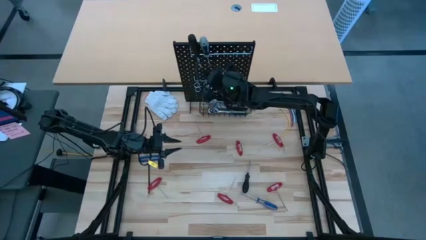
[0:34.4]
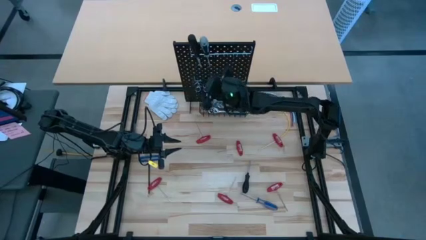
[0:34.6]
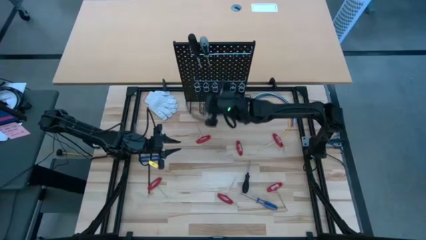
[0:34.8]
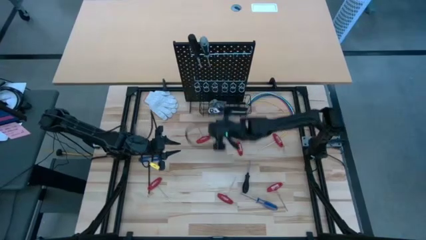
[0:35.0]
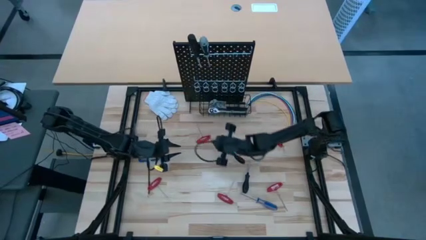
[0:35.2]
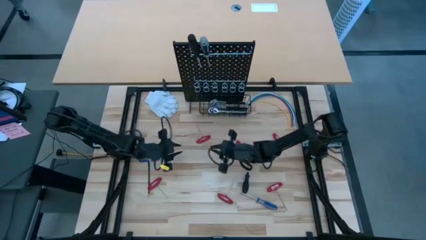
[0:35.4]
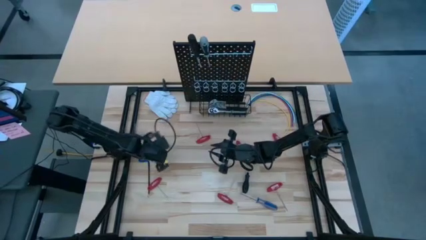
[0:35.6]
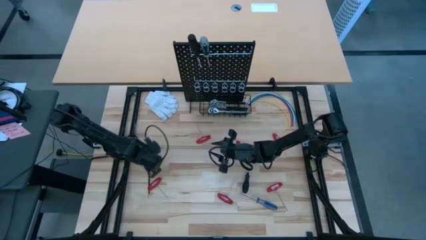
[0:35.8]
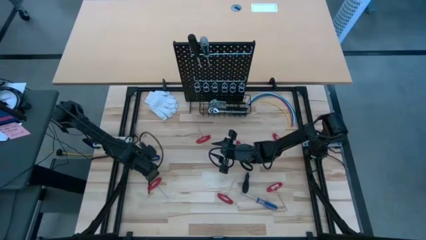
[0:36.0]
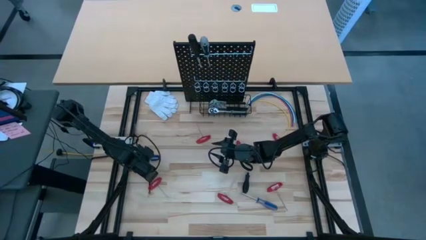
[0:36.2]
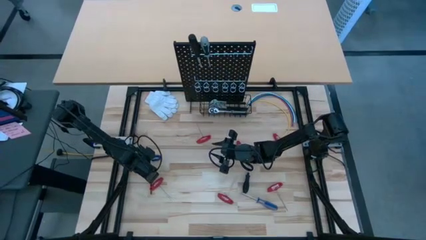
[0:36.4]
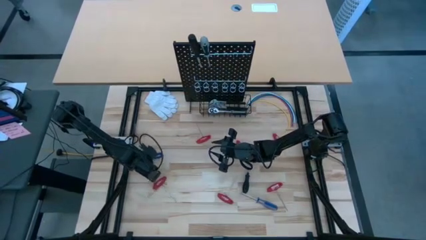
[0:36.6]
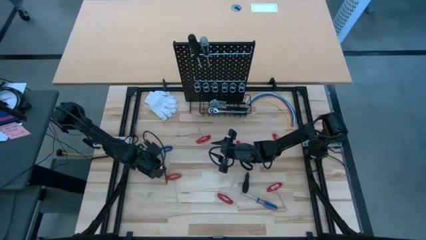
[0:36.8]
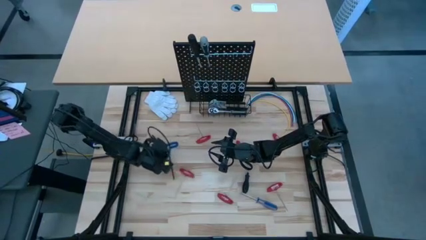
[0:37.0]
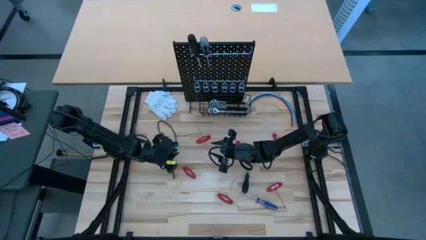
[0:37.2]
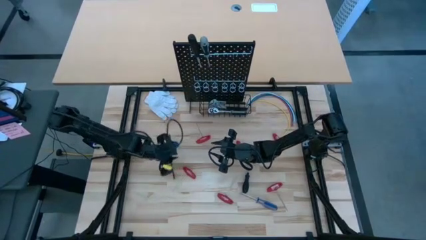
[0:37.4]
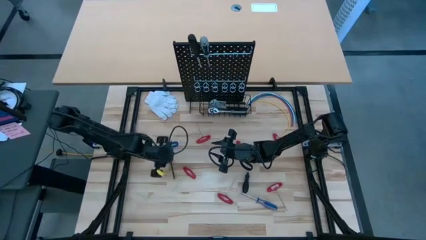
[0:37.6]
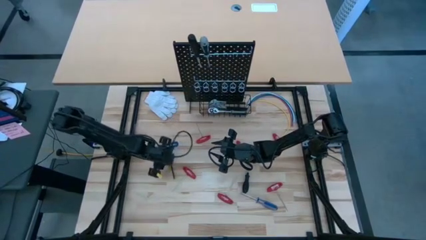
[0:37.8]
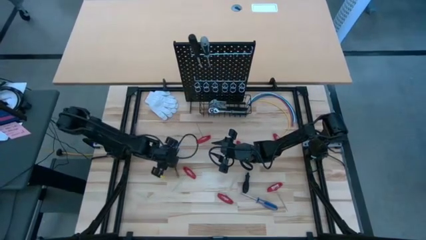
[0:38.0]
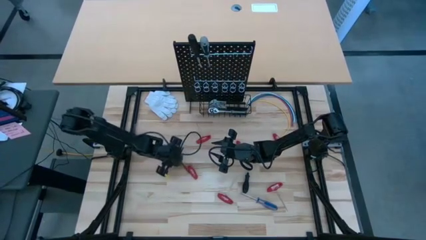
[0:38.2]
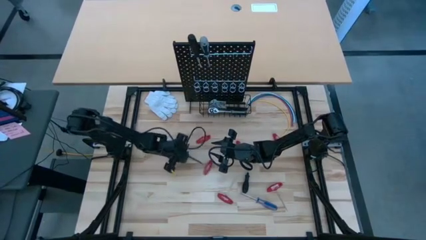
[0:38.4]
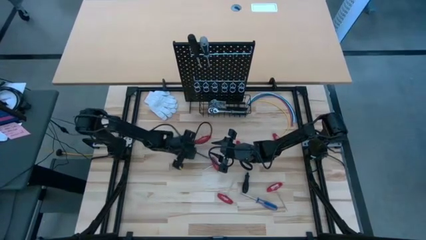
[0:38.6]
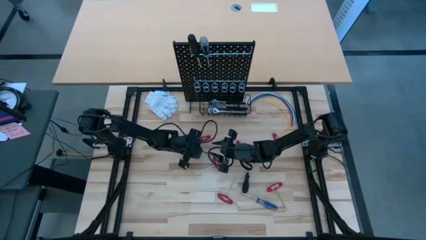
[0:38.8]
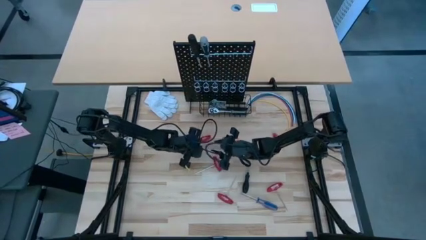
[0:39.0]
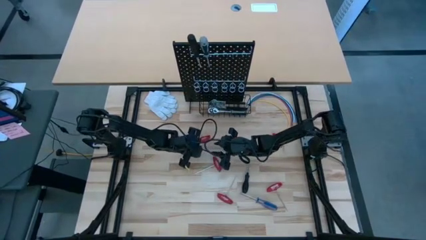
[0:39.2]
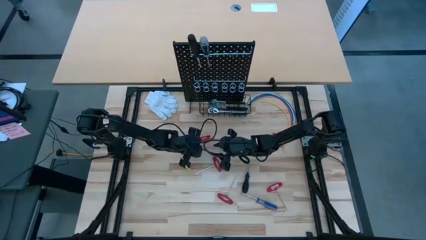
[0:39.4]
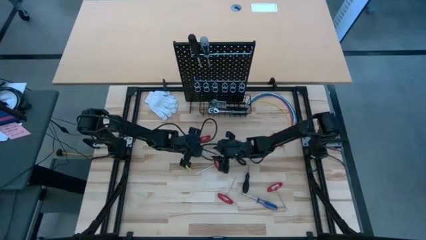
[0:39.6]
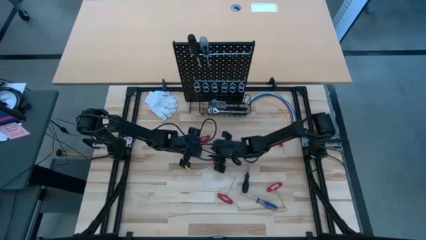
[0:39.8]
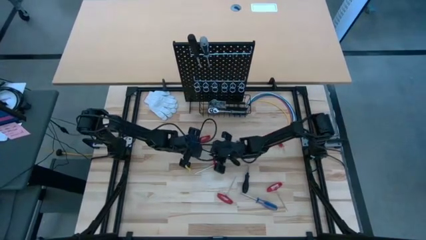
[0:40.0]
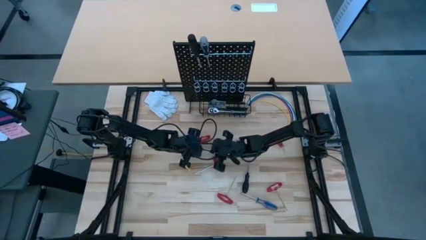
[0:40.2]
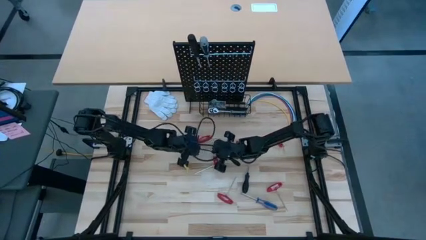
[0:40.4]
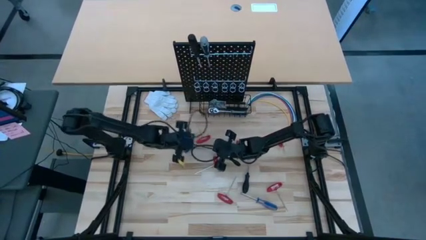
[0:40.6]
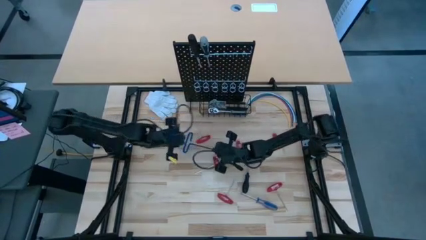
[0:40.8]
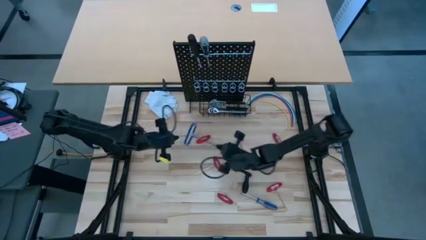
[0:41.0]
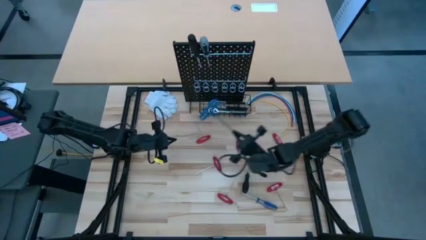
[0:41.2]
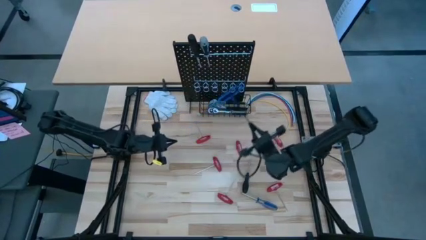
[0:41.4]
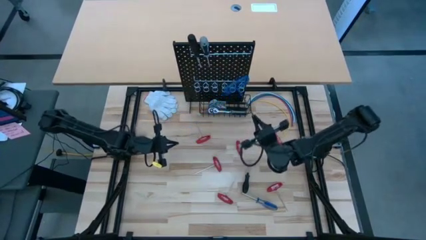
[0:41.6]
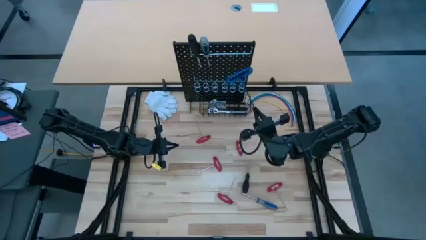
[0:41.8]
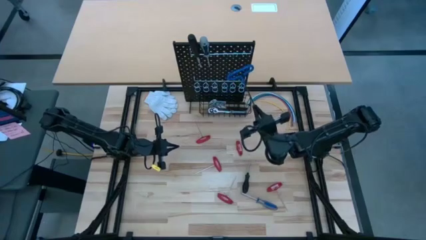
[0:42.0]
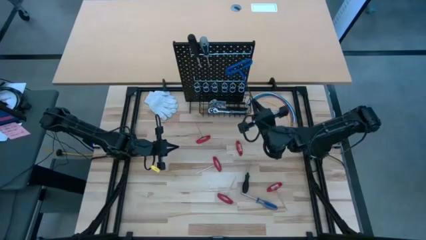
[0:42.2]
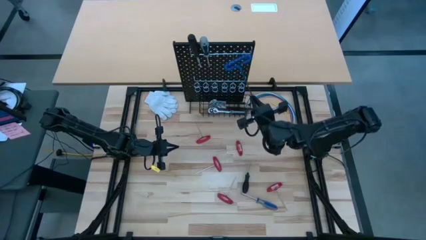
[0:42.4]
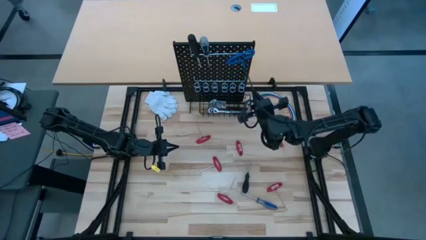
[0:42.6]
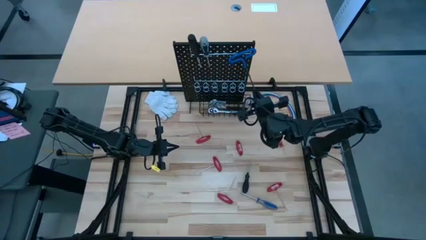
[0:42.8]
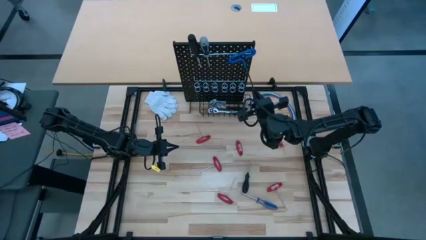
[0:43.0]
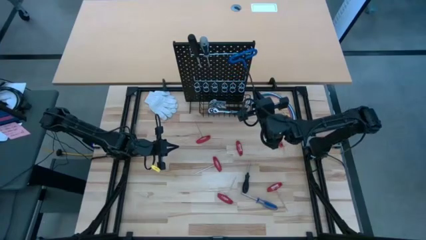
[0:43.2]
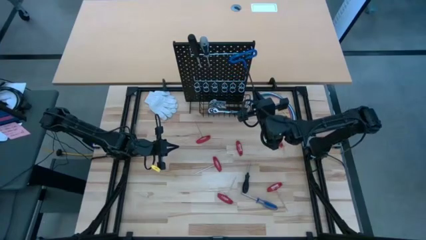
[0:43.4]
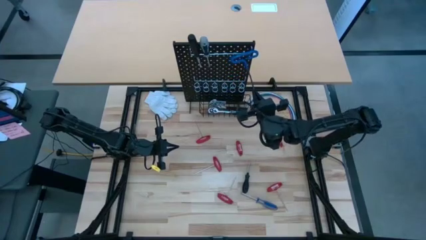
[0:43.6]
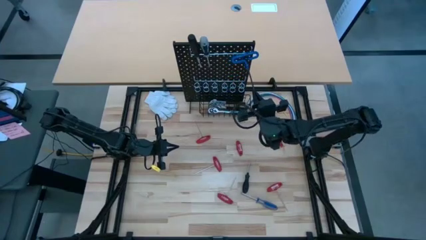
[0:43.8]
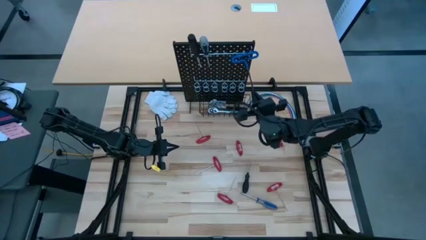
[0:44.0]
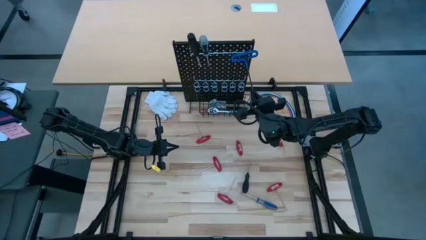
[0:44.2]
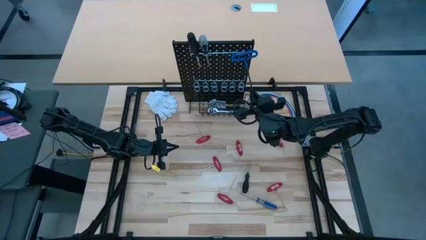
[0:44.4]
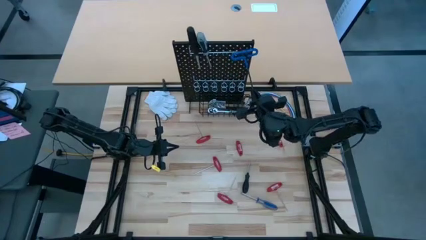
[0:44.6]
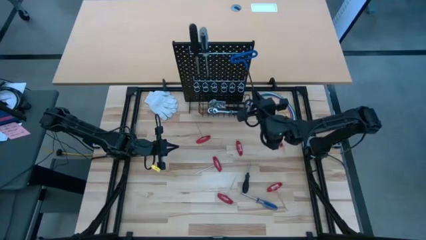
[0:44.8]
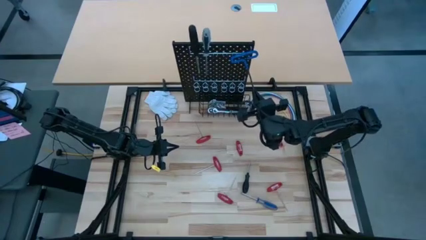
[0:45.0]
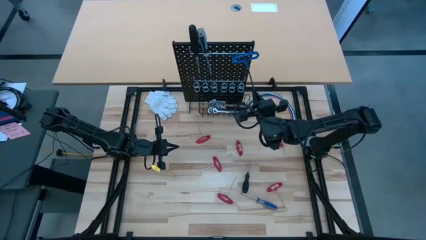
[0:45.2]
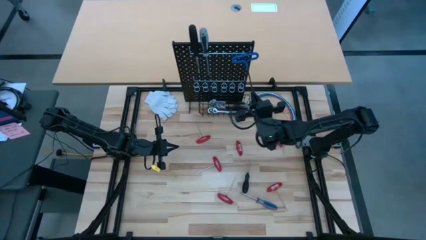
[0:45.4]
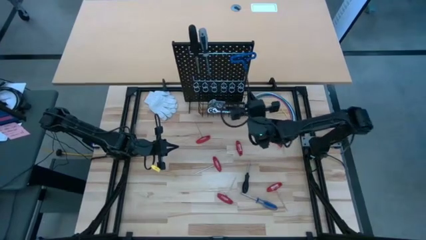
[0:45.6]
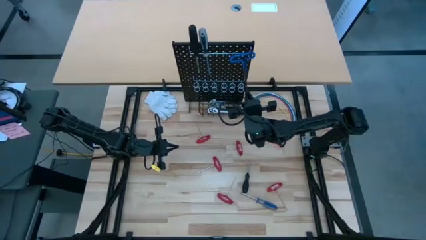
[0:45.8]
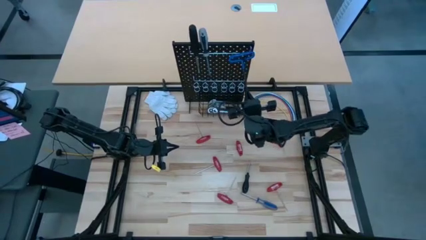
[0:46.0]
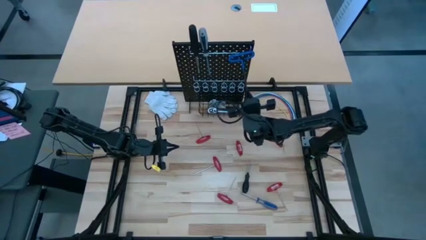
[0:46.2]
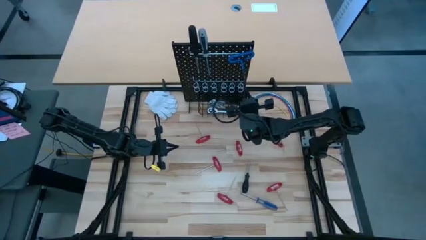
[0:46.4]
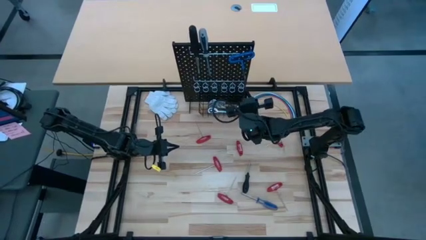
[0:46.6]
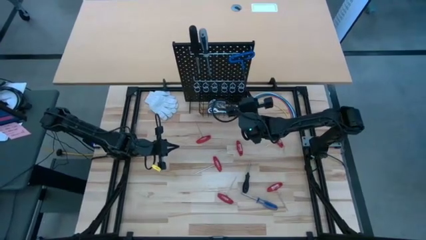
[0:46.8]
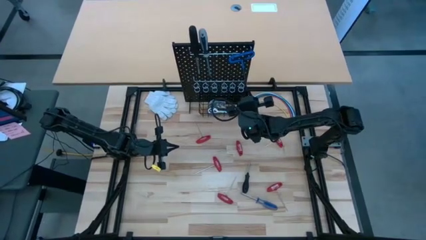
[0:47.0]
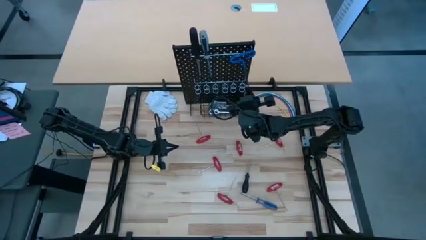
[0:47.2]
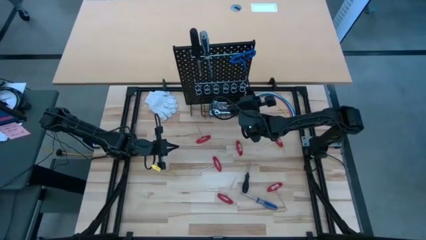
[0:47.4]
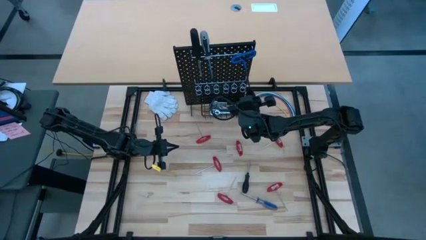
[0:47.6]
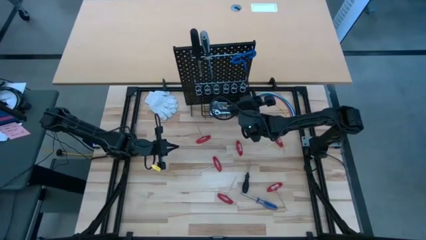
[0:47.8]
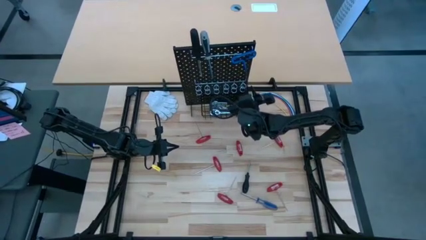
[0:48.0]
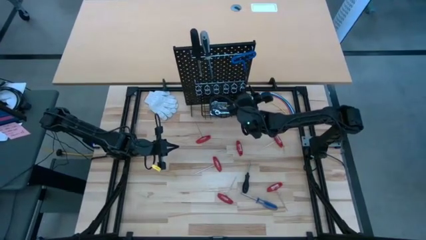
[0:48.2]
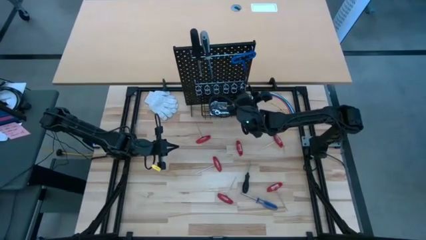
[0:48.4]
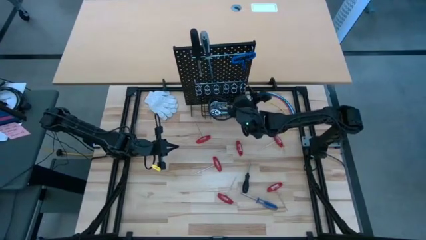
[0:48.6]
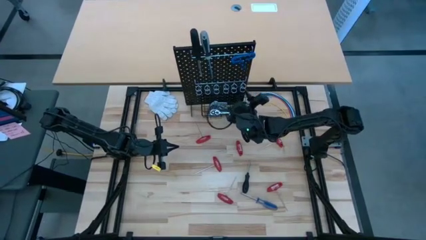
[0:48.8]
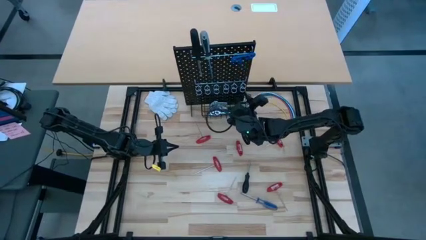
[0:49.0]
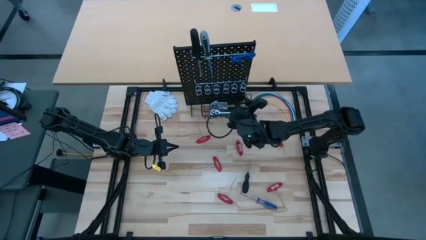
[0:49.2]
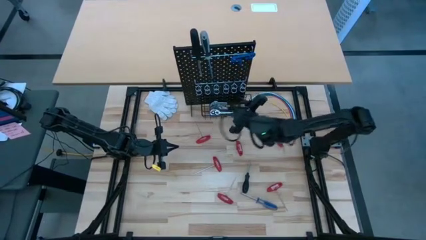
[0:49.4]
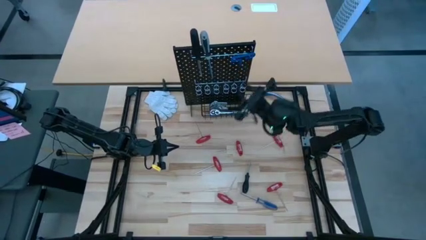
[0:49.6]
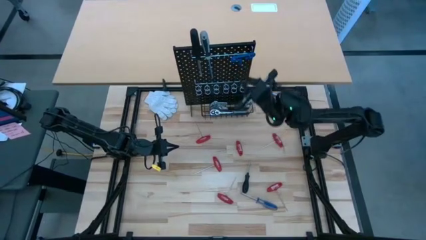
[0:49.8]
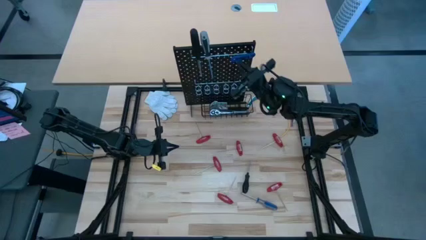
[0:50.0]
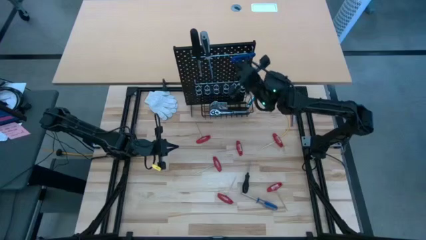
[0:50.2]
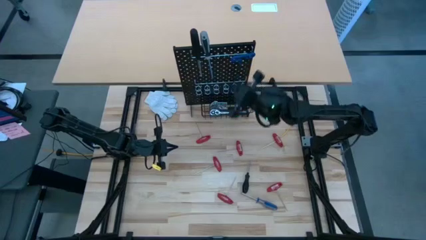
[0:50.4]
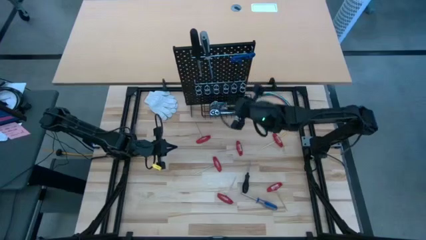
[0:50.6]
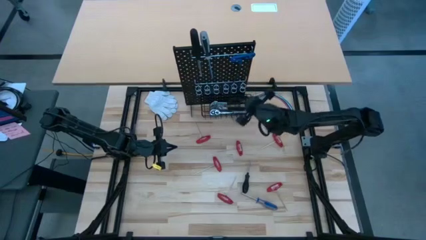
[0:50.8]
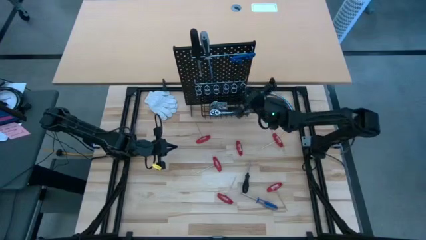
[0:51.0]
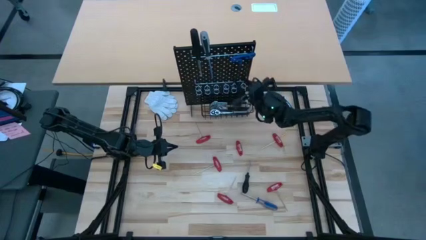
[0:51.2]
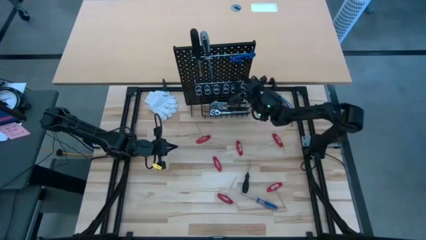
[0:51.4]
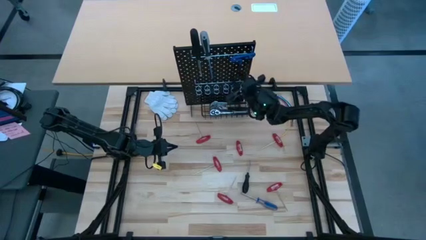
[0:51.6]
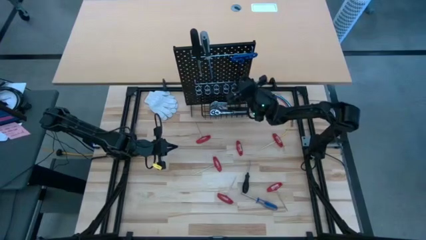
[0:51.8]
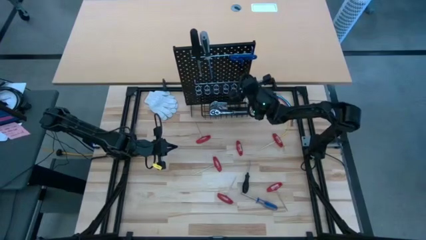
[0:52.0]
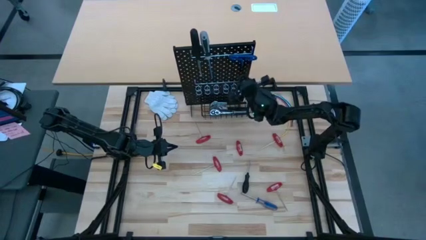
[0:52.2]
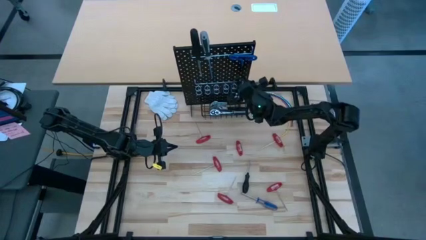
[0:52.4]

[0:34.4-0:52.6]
Task: Hang tools onto peg board
Hang the blue pick tool on the pegboard
